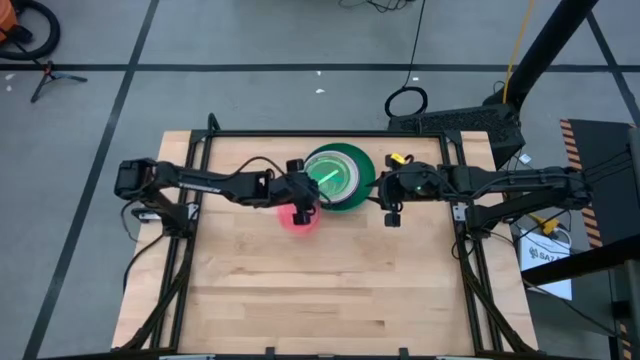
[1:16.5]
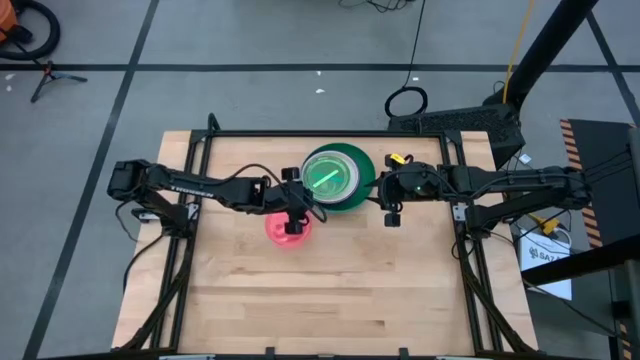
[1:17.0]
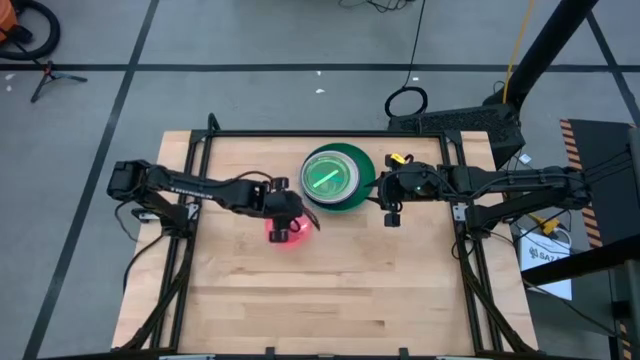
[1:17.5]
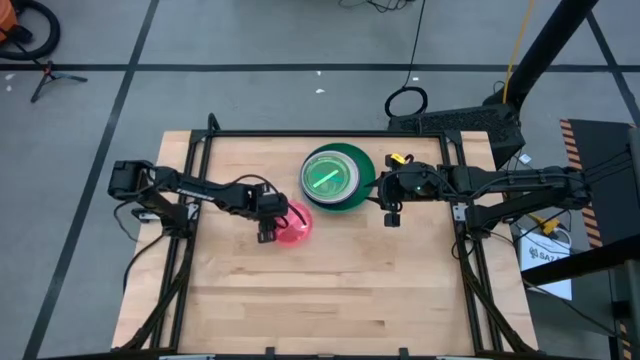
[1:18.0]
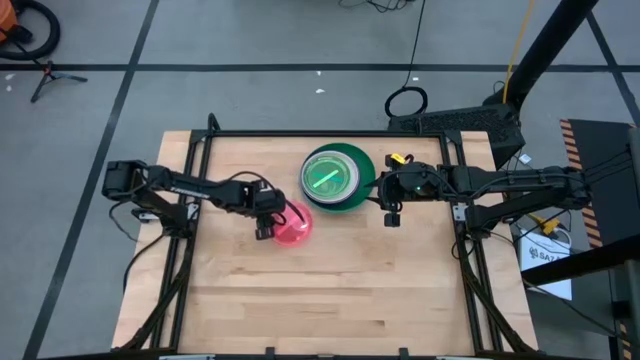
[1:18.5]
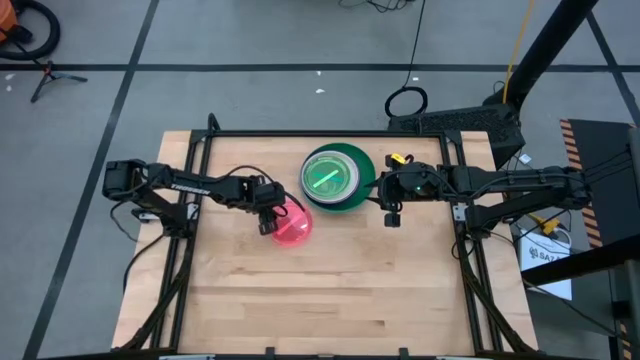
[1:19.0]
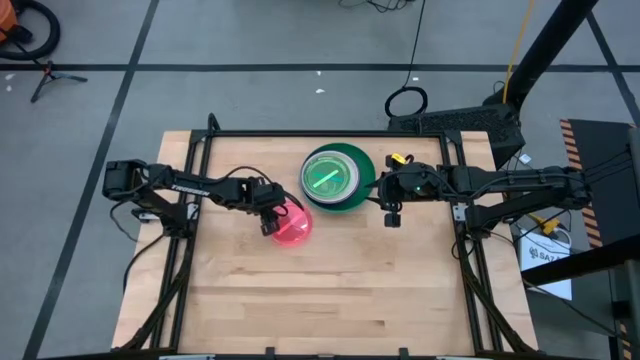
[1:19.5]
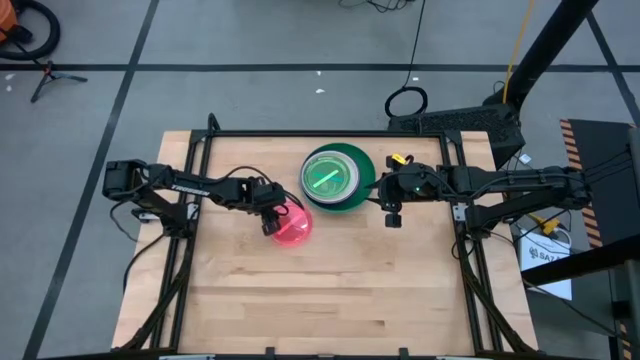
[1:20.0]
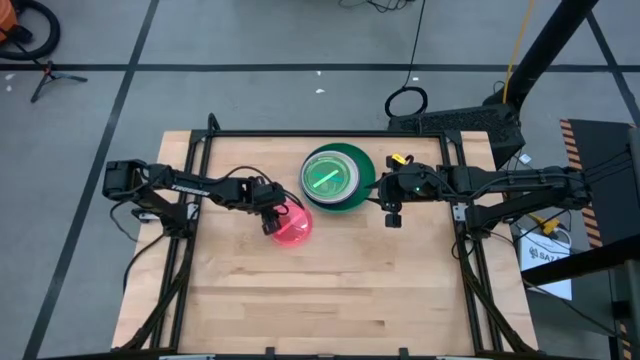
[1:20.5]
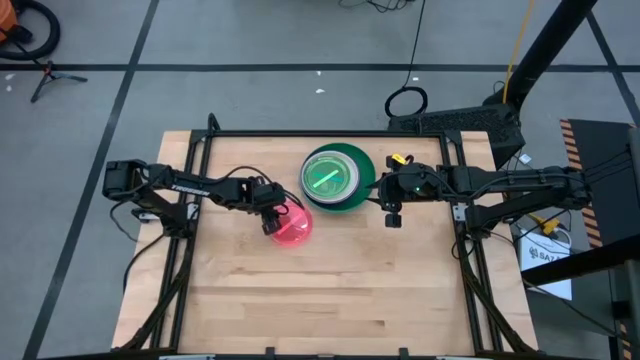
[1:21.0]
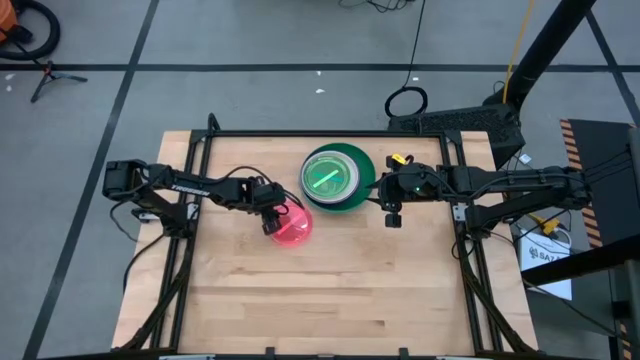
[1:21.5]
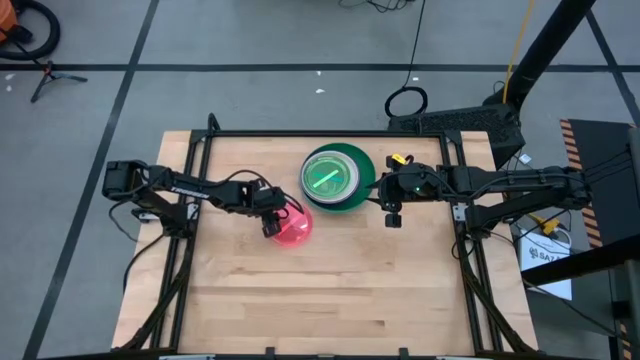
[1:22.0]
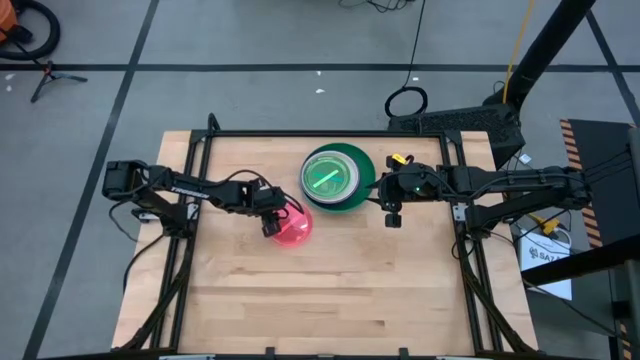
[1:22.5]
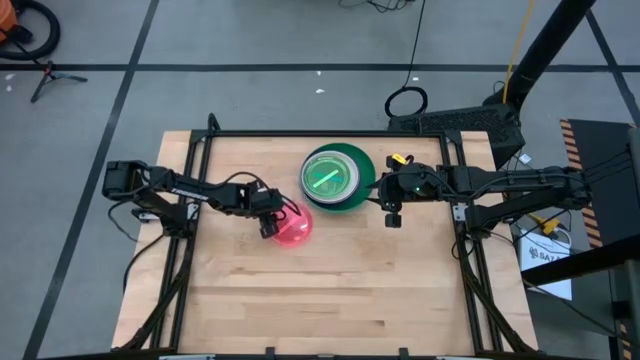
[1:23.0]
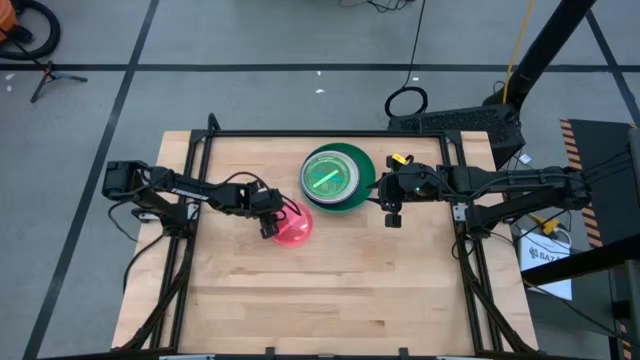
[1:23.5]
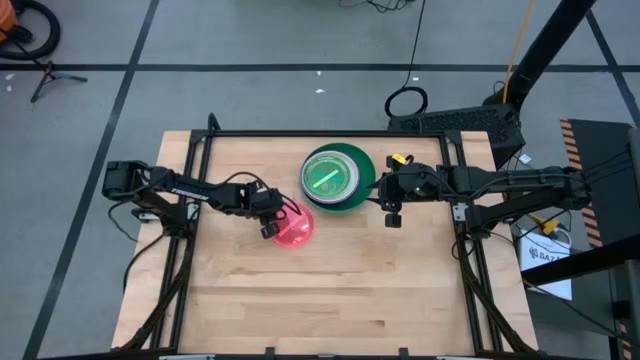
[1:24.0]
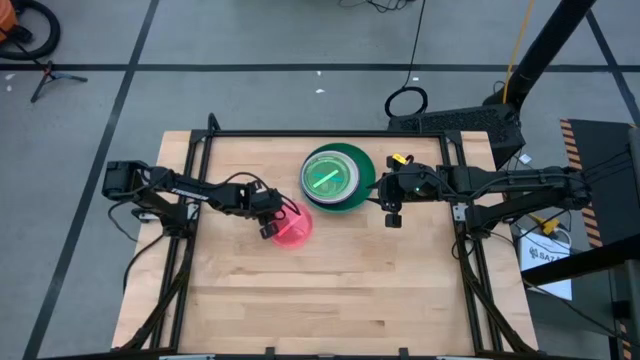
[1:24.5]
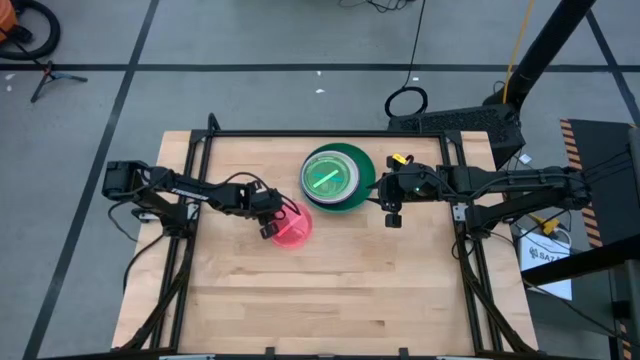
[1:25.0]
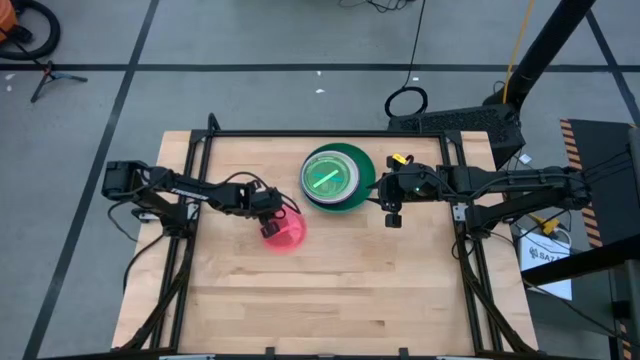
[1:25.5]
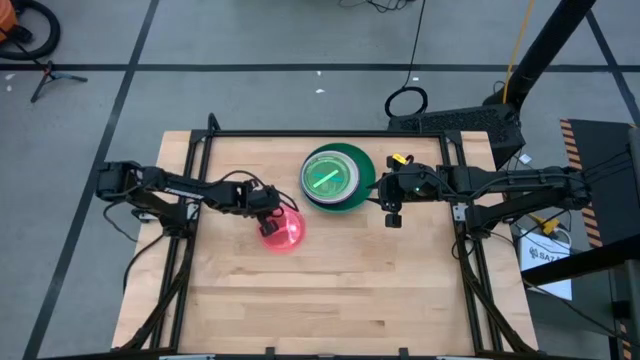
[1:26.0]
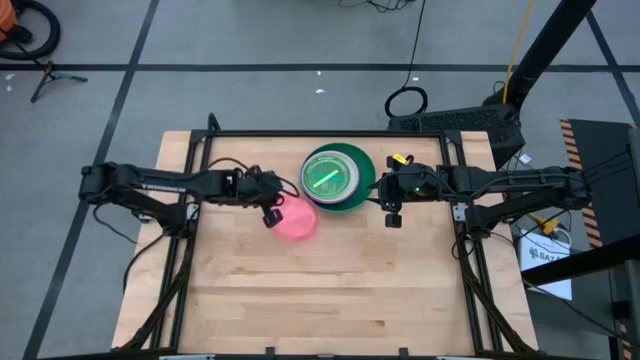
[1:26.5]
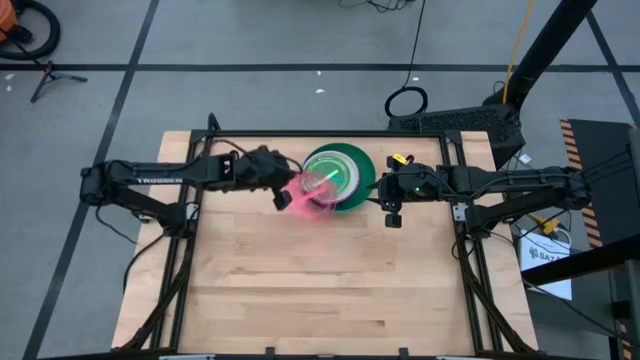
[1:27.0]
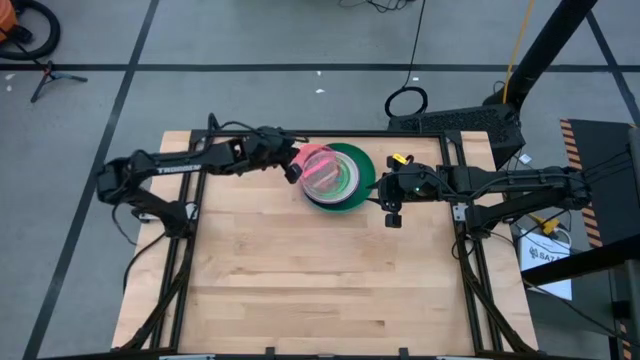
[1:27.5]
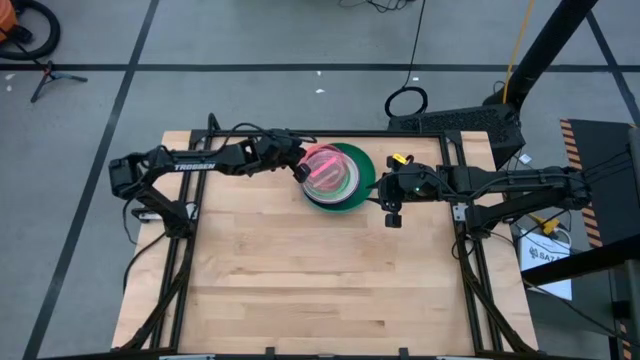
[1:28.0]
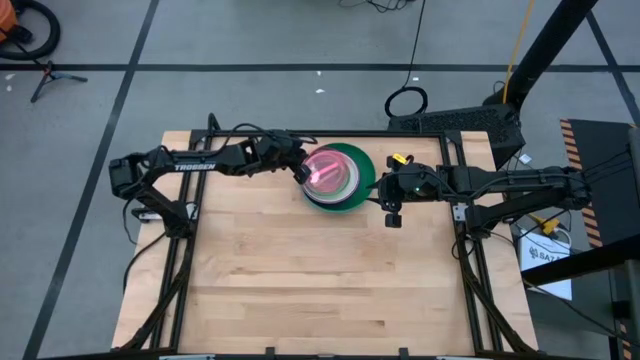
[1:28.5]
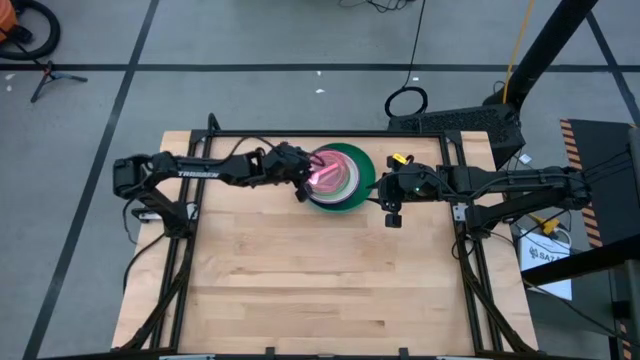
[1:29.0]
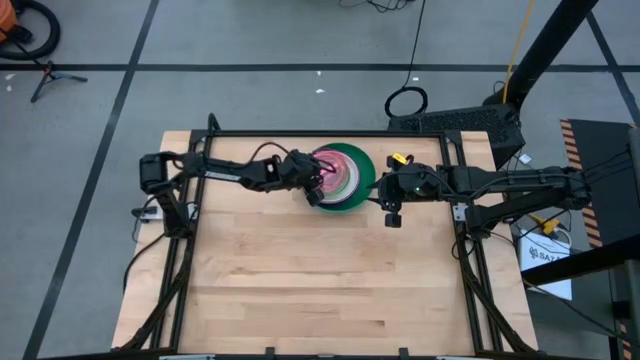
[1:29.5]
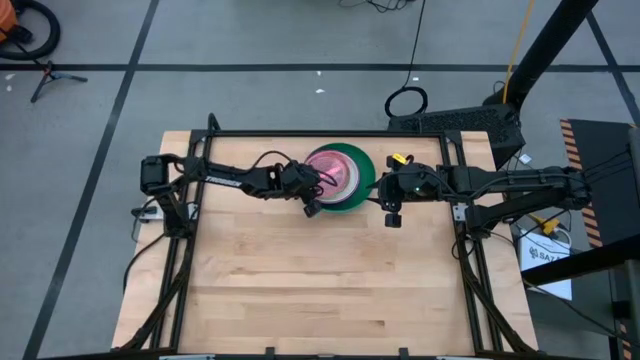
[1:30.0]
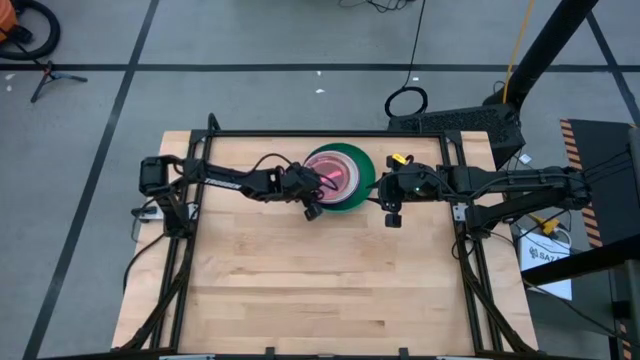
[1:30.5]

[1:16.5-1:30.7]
Task: Stack plastic plates
Stack the pink plate on top of the green plate

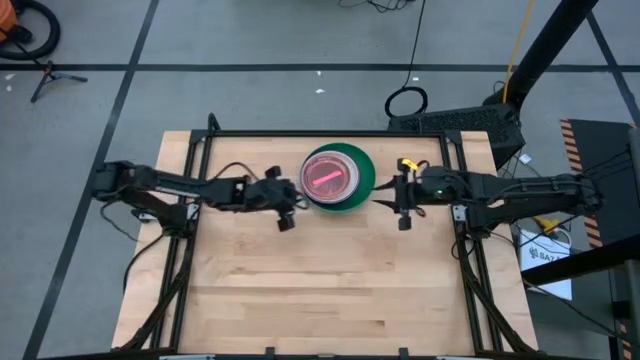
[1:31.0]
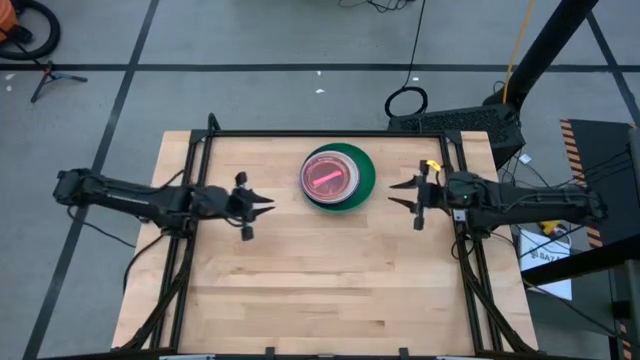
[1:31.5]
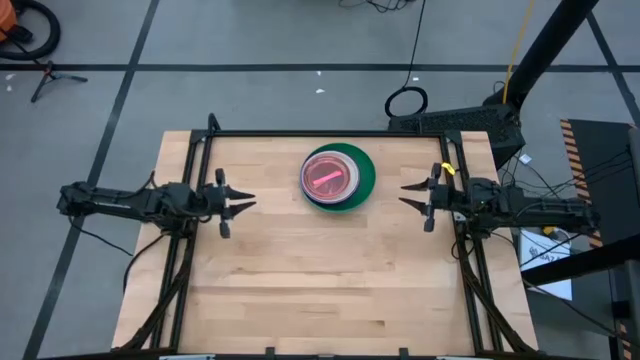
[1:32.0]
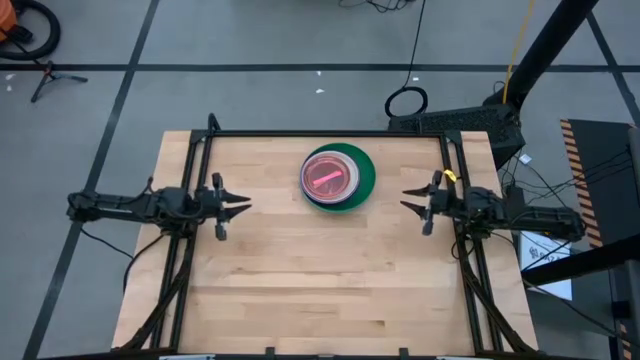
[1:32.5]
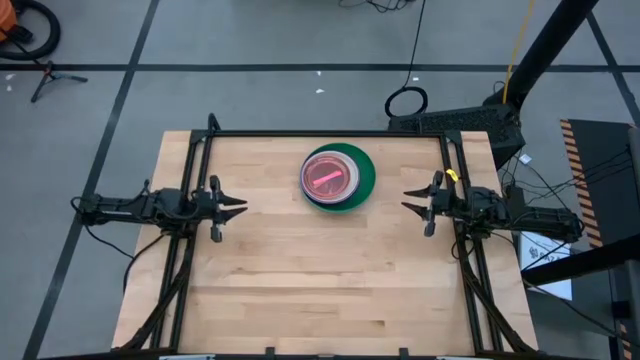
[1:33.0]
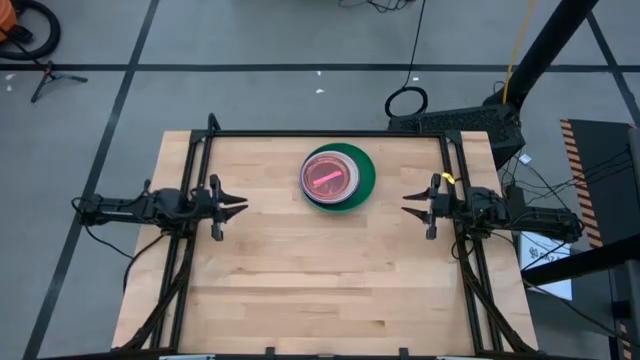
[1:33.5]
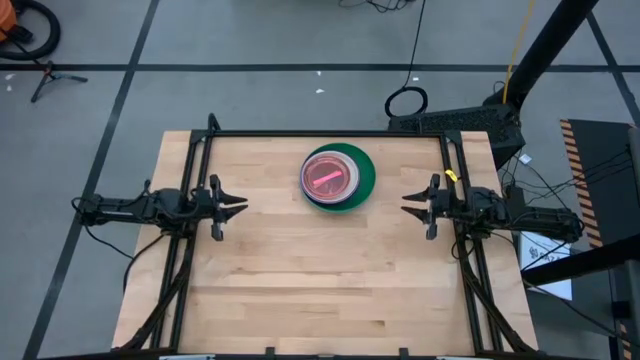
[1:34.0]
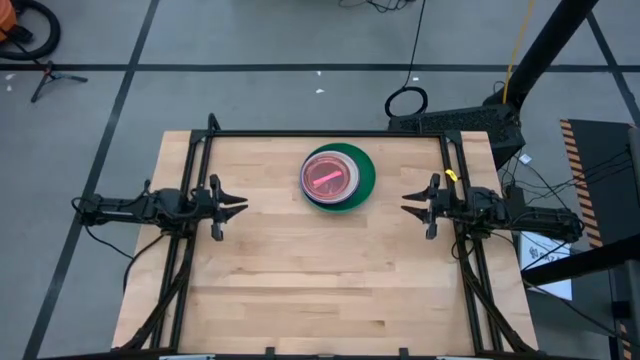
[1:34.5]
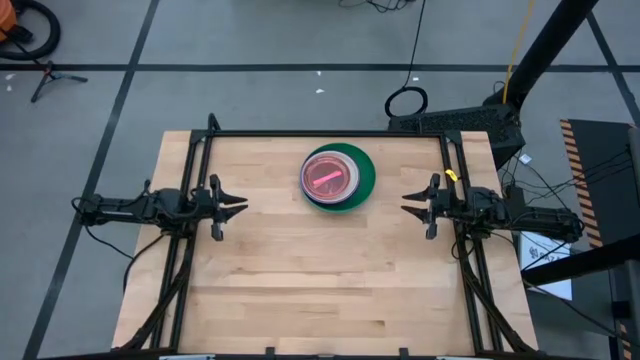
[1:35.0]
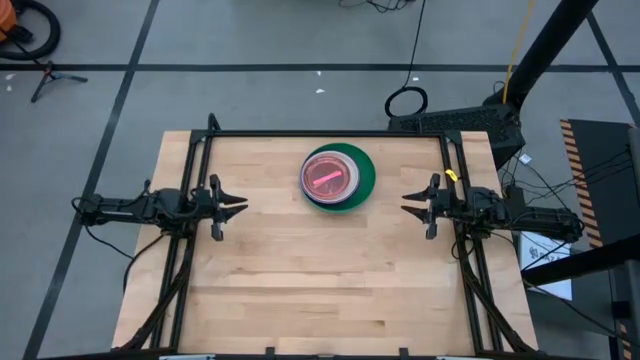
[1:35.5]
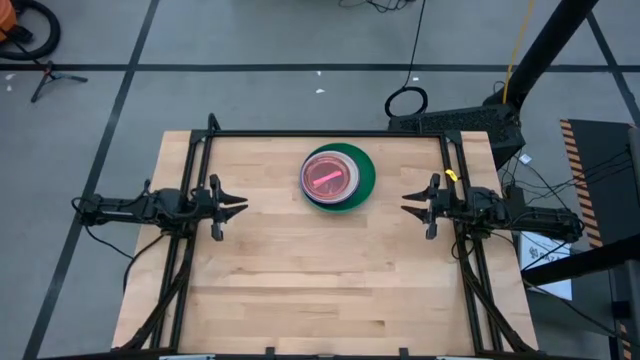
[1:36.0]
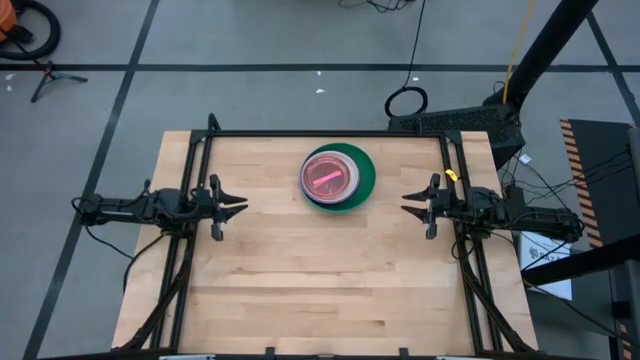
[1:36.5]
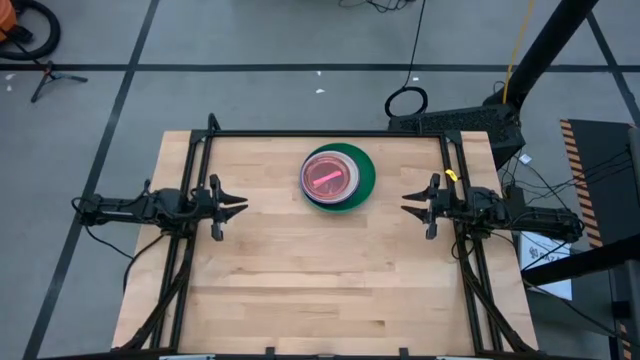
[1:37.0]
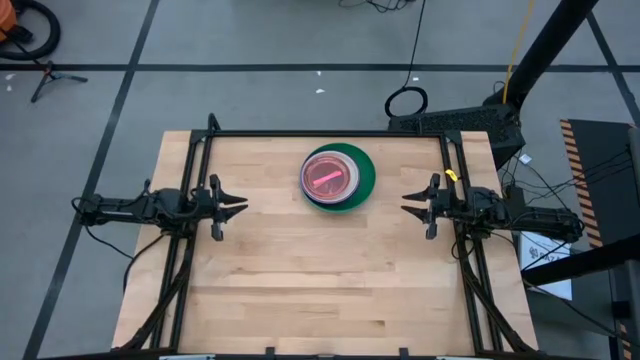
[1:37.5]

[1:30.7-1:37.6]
Return to Home Position
